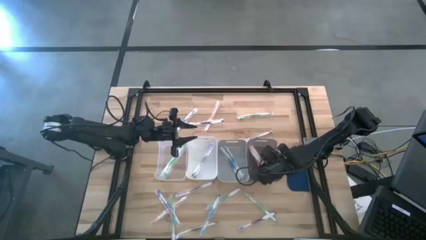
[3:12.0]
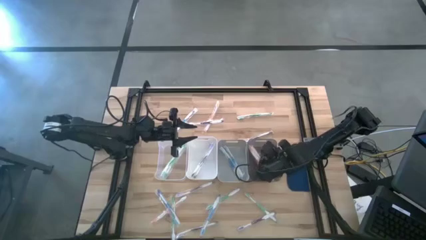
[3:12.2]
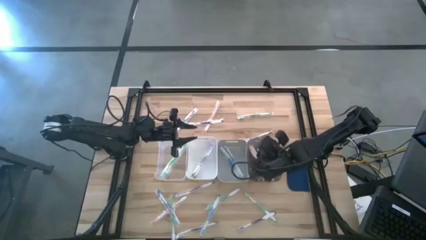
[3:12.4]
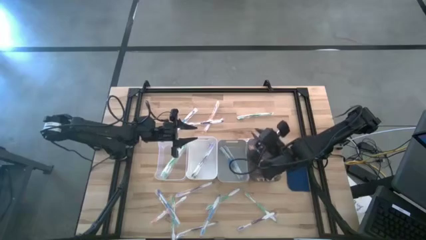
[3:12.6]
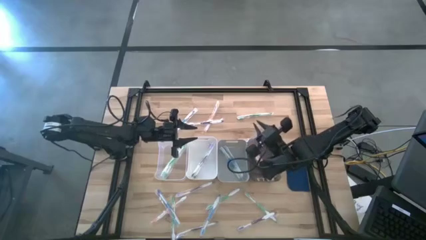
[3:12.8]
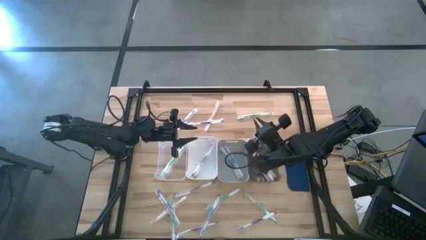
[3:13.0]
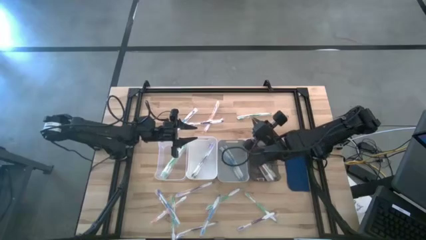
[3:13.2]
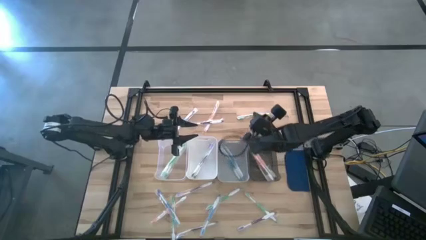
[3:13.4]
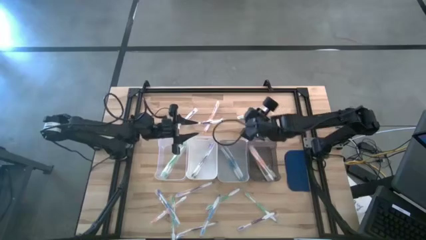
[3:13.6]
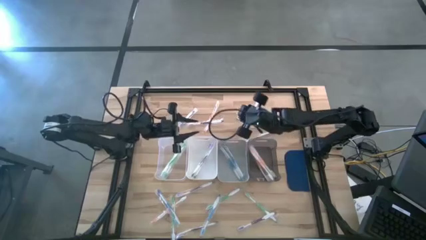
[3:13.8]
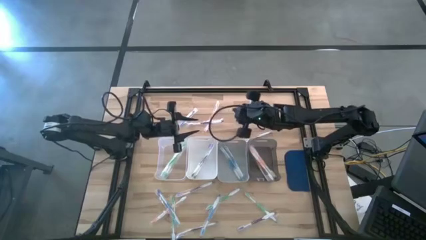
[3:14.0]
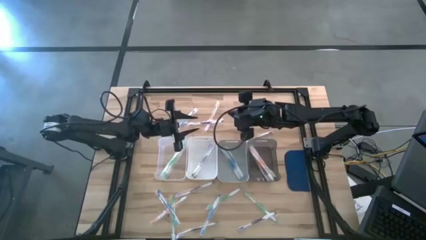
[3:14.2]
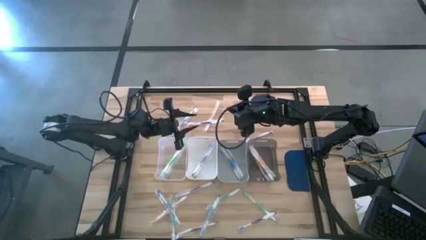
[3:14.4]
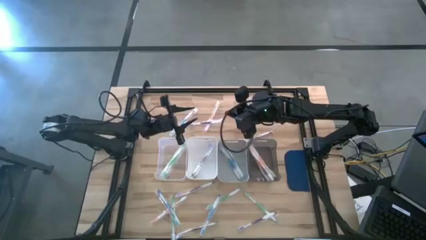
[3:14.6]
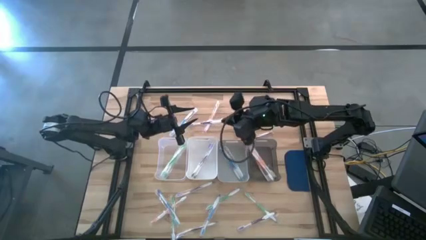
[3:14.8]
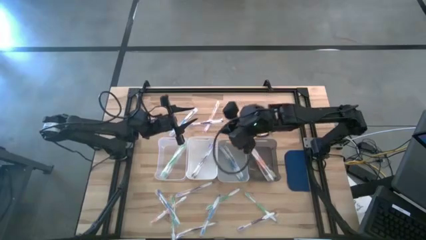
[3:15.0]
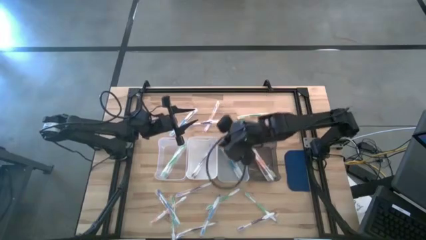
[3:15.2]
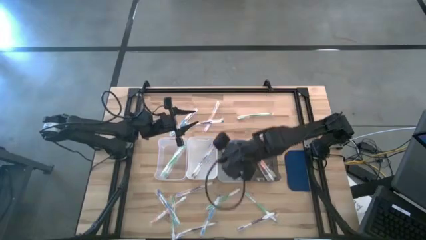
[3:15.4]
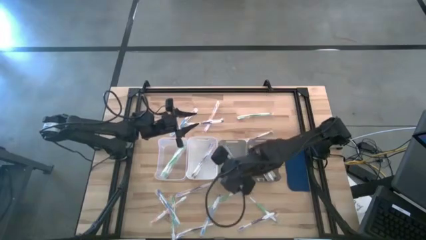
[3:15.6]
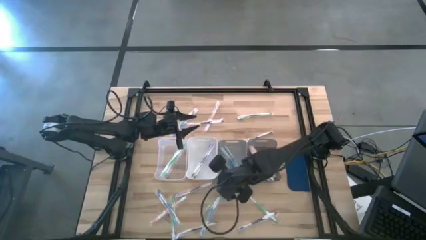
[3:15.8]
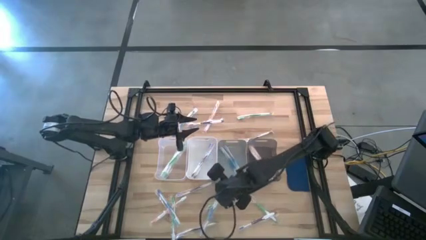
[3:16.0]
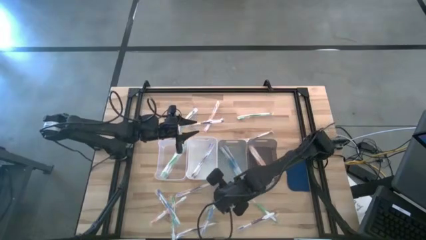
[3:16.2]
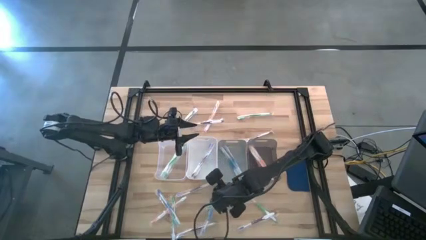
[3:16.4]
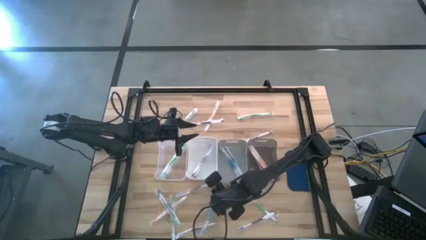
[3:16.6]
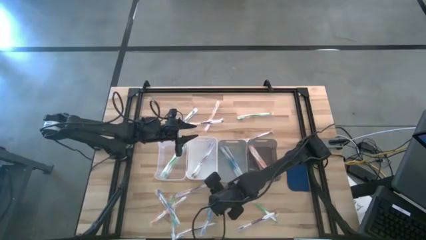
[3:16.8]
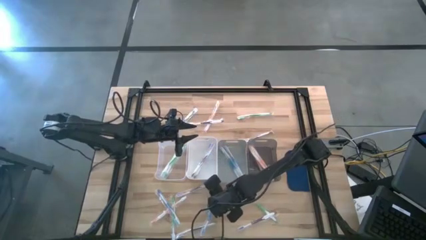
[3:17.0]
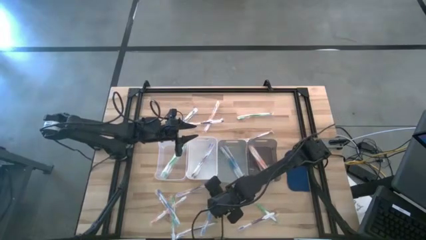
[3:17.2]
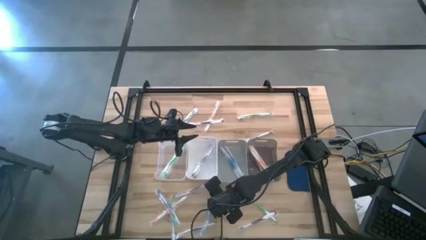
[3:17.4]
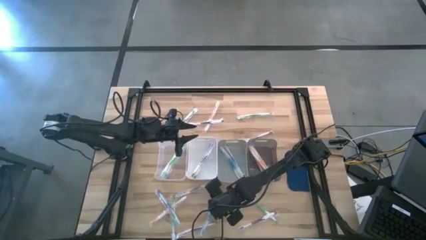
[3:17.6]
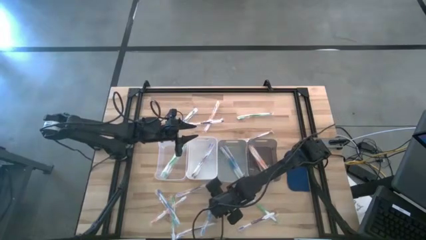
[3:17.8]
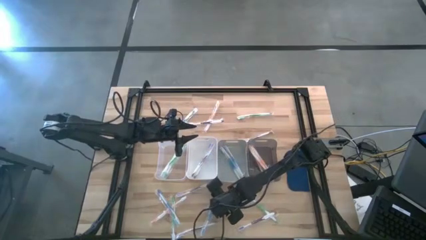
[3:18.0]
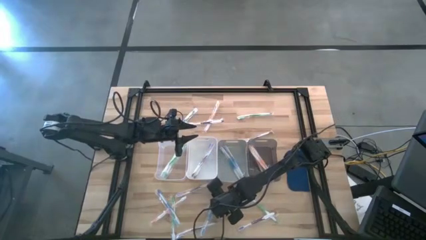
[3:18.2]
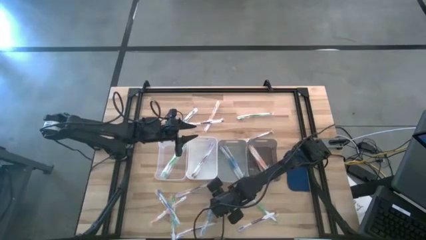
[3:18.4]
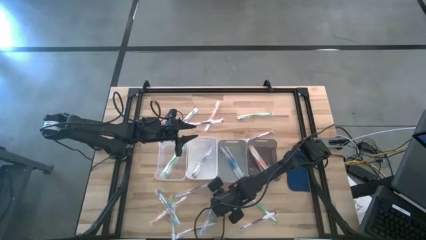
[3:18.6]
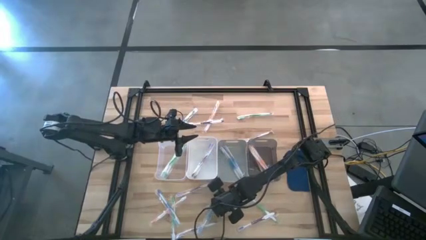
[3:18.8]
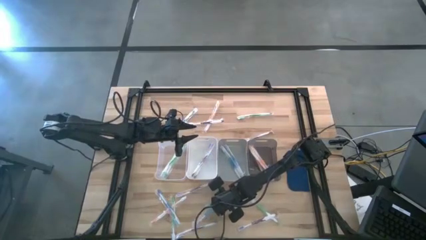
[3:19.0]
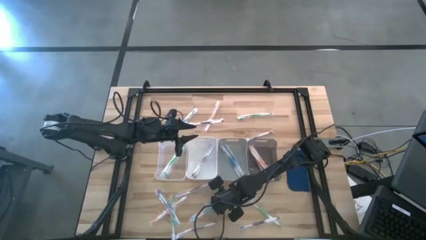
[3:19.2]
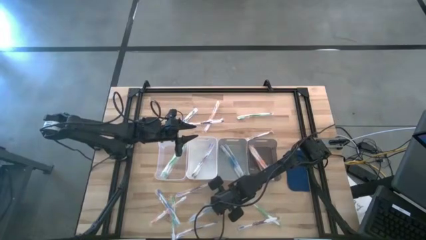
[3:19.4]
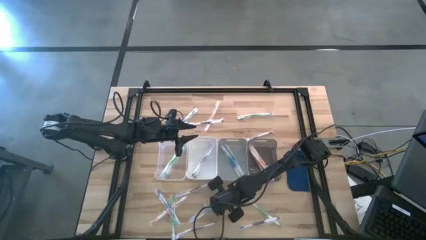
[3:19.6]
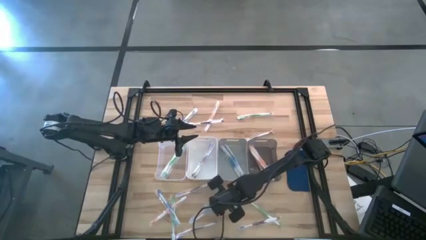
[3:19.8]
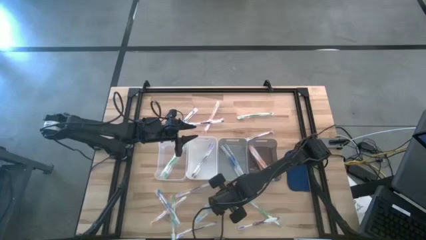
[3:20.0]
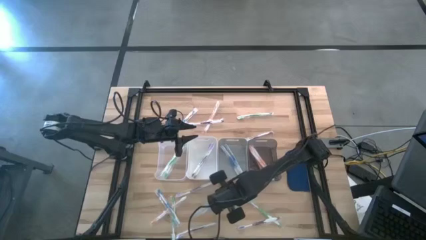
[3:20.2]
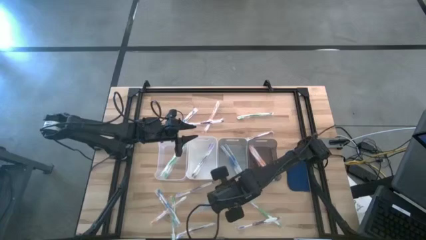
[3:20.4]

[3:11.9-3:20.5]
Task: Pick & Place Toothbrushes
Put the blue toothbrush into the gray bin

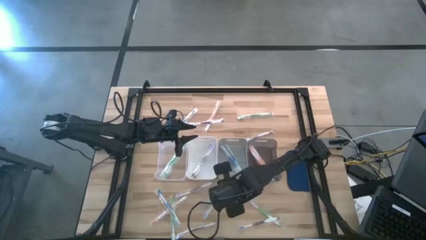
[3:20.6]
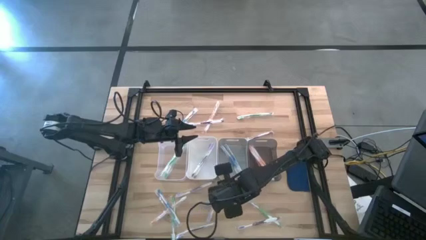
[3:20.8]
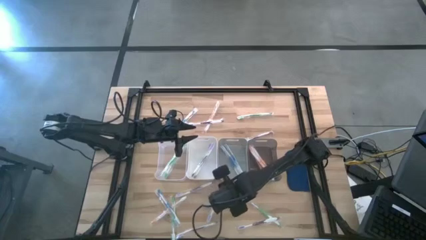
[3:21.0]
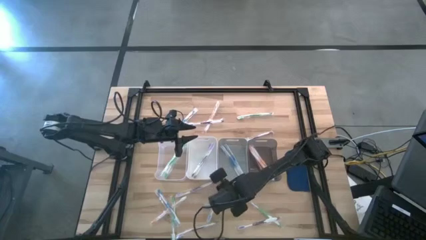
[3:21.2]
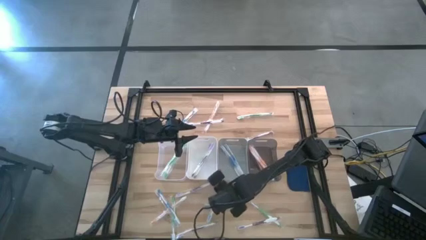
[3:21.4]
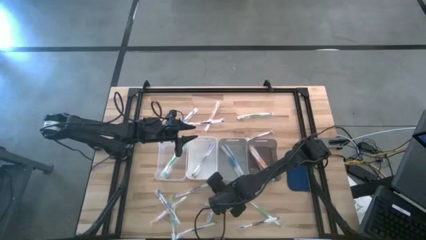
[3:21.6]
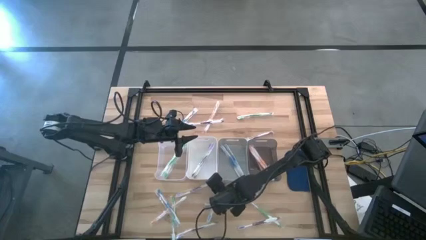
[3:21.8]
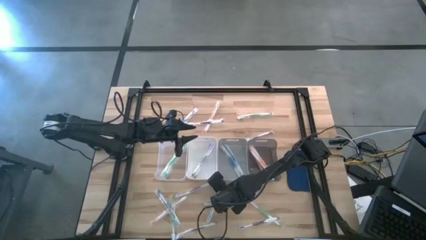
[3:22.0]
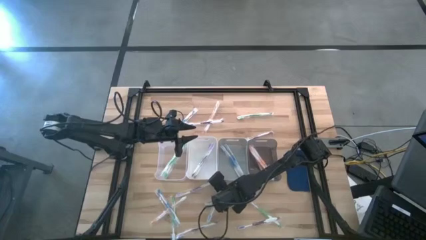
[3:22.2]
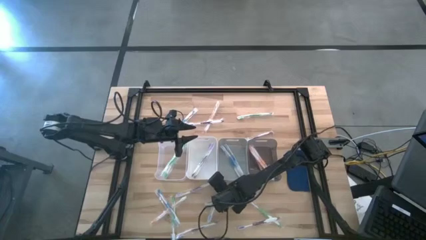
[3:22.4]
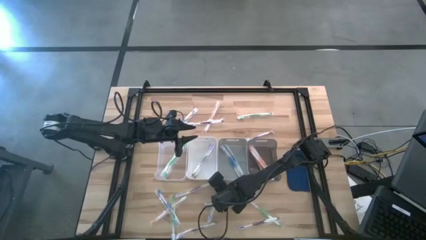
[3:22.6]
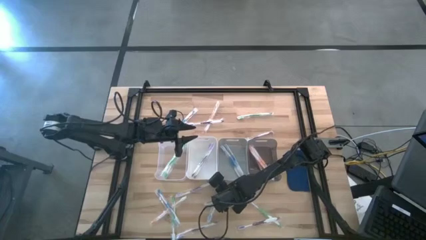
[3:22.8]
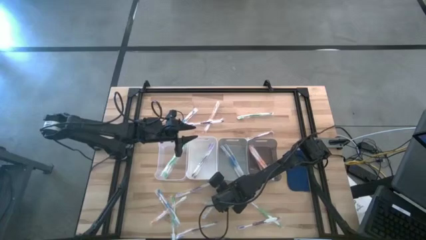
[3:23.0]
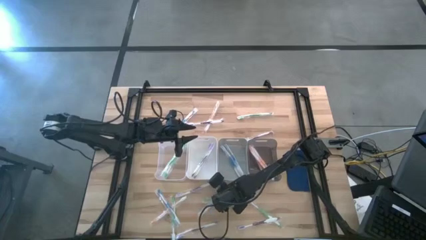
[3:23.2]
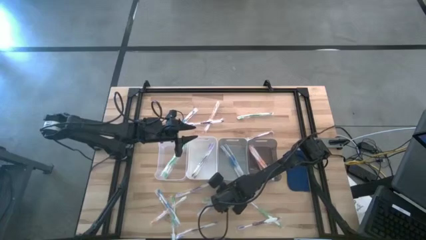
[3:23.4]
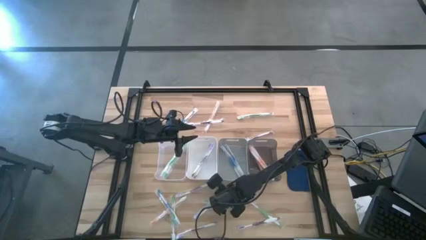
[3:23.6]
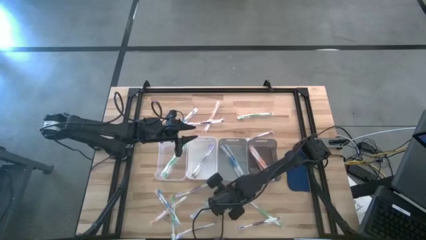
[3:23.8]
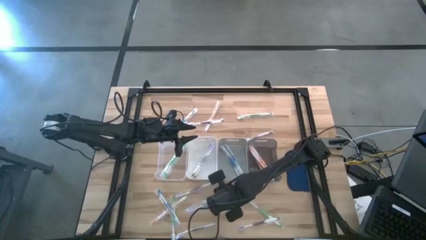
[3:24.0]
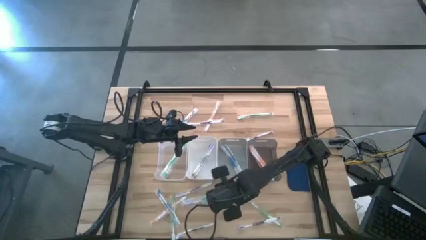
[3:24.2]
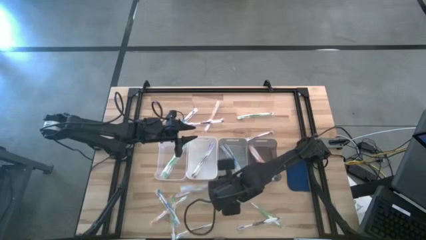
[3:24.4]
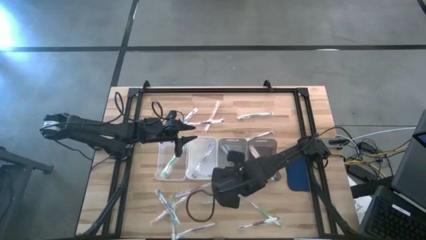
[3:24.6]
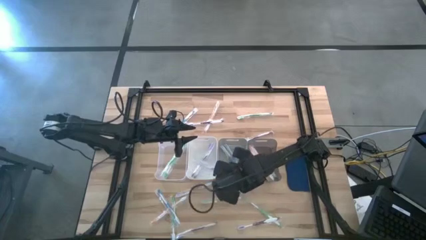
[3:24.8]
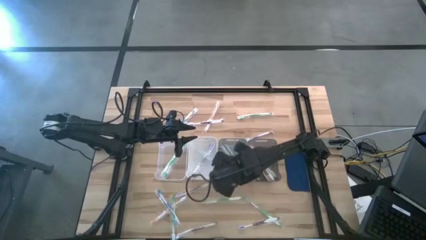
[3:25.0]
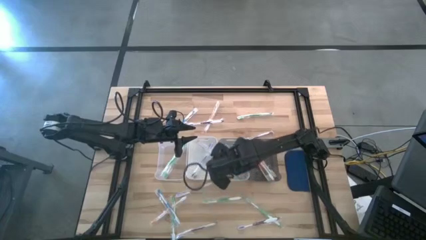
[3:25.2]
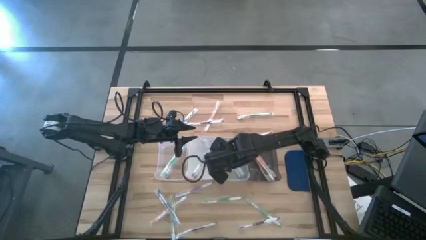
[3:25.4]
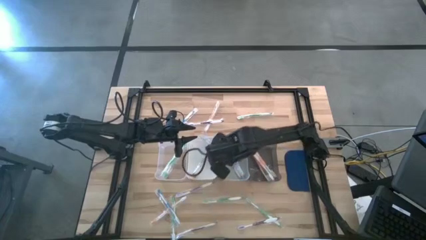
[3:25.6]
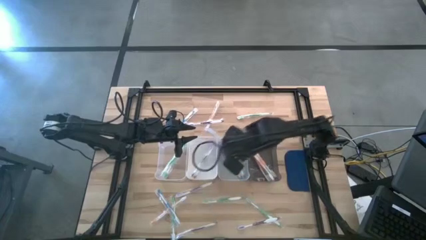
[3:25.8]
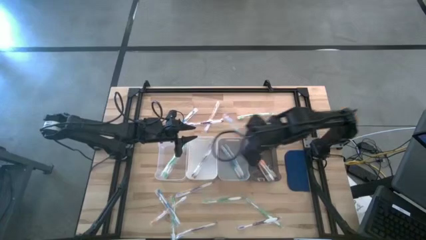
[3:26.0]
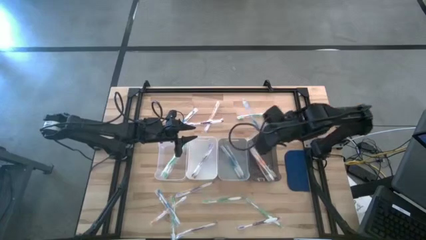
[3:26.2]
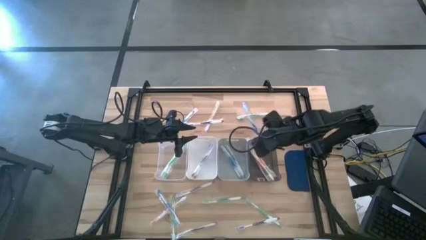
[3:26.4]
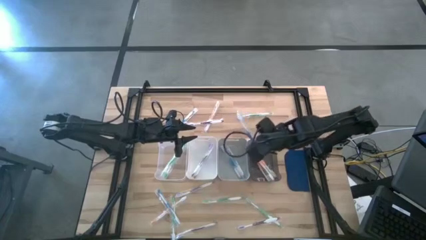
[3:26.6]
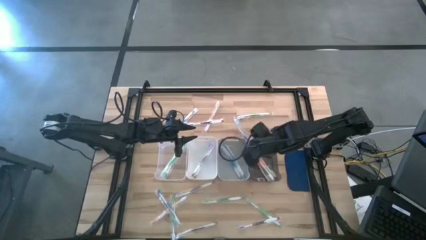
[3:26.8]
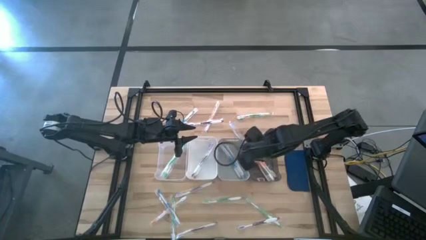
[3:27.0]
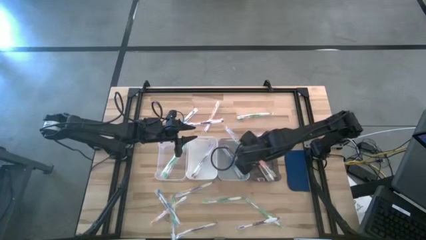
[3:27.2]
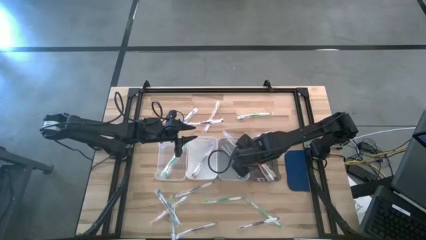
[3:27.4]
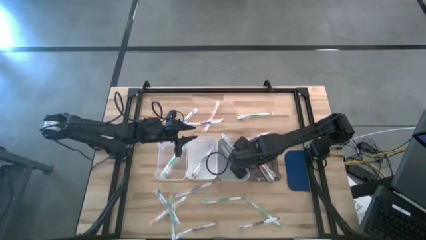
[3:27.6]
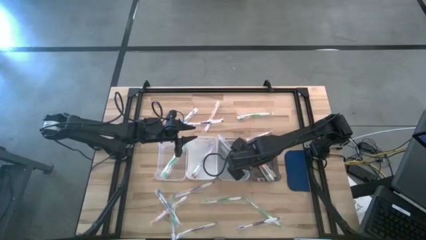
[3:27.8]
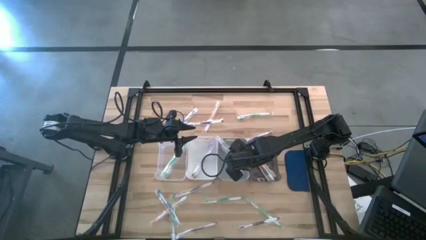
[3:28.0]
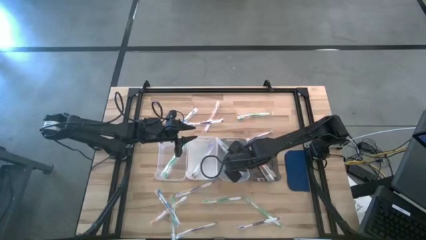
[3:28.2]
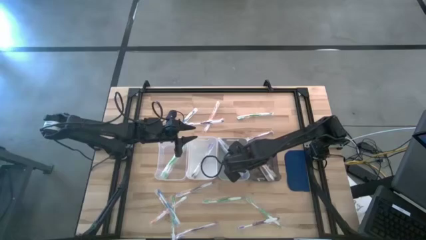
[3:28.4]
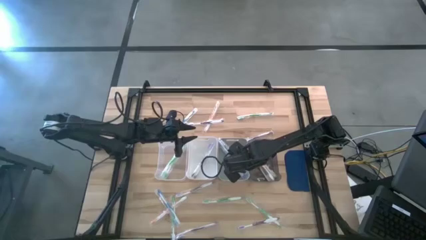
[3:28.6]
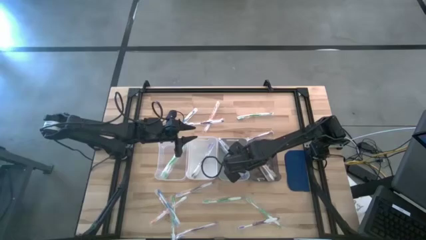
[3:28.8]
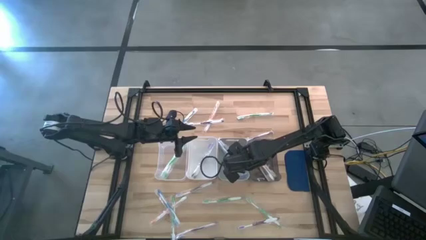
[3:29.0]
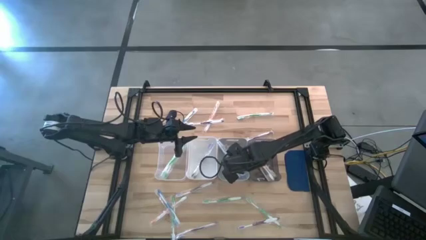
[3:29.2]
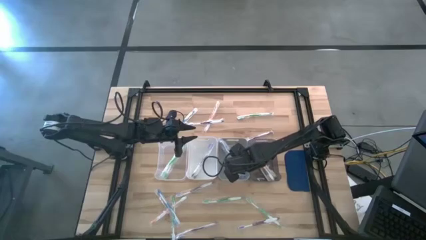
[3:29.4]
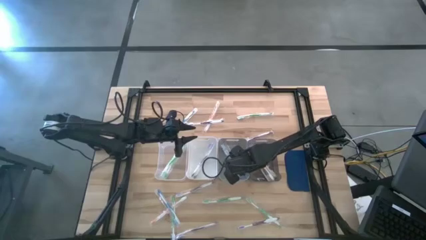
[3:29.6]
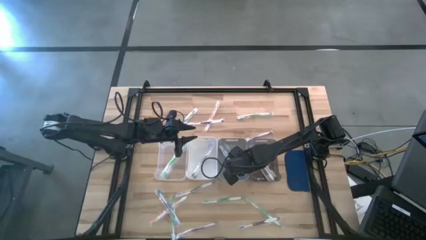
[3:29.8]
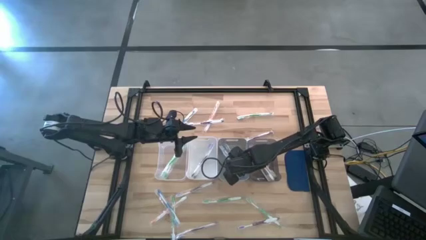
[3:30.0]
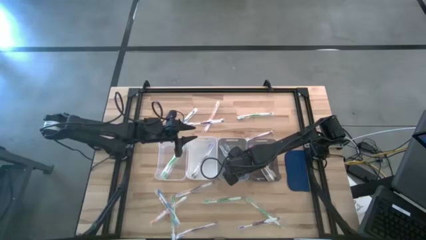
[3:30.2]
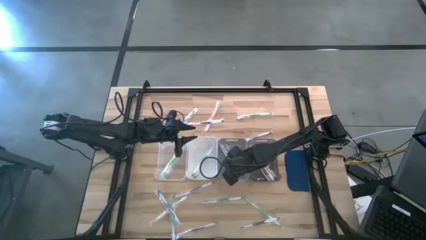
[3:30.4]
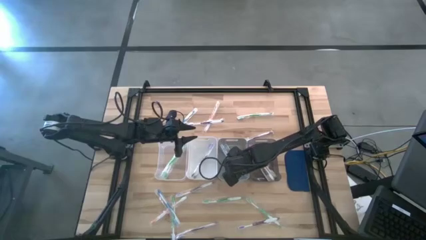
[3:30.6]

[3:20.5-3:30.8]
Put the blue toothbrush into the gray bin
